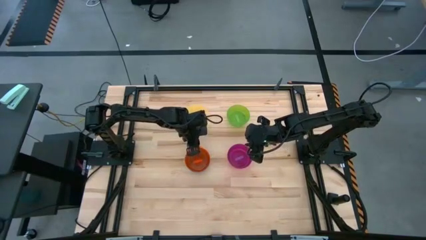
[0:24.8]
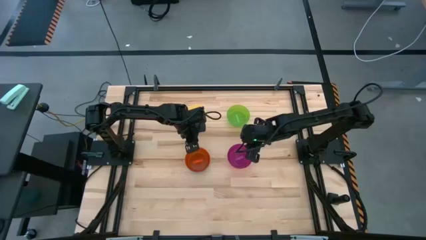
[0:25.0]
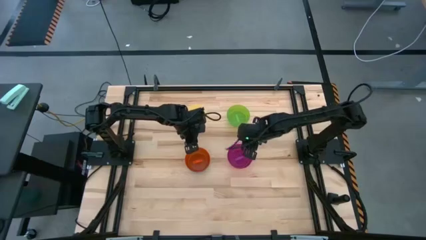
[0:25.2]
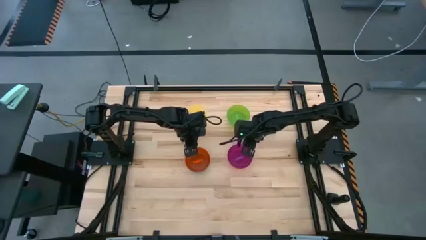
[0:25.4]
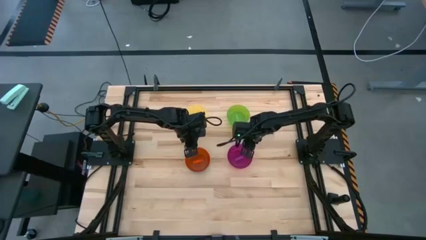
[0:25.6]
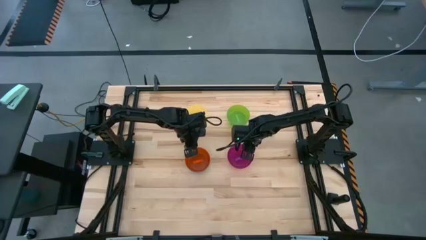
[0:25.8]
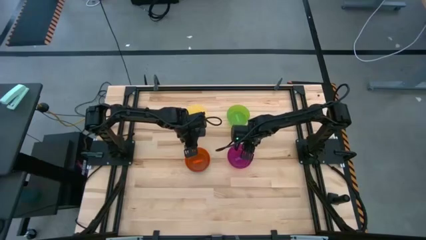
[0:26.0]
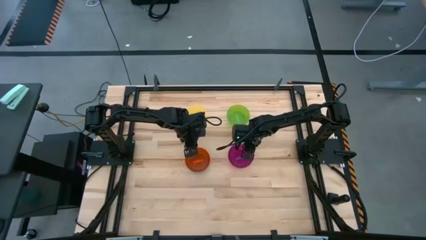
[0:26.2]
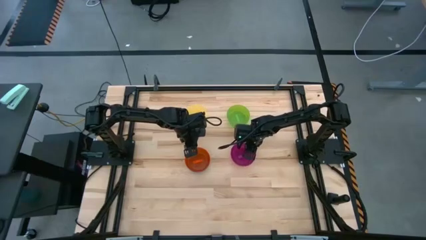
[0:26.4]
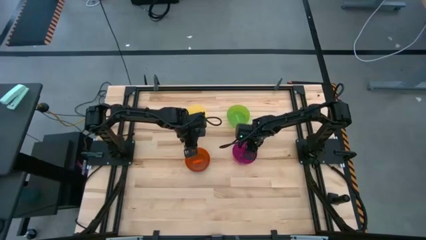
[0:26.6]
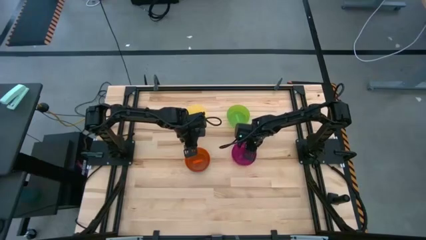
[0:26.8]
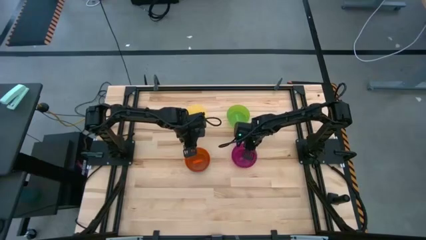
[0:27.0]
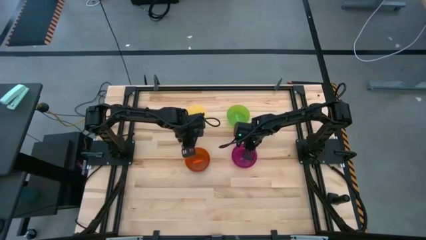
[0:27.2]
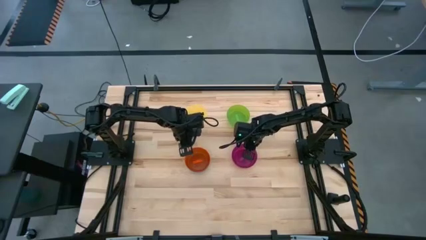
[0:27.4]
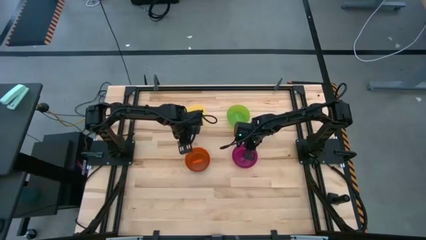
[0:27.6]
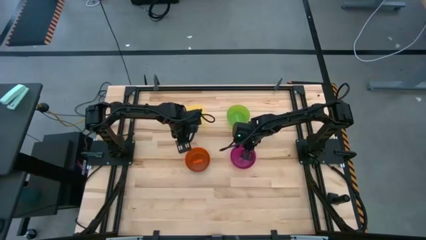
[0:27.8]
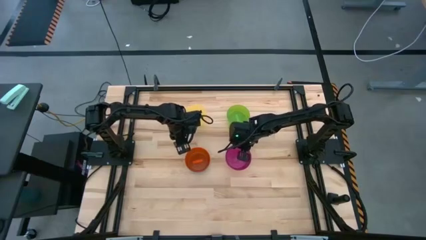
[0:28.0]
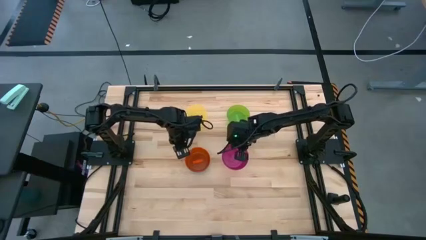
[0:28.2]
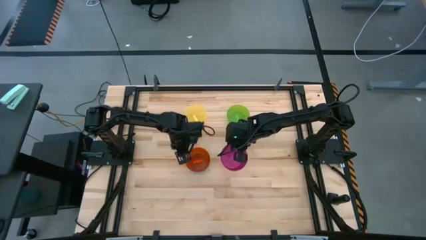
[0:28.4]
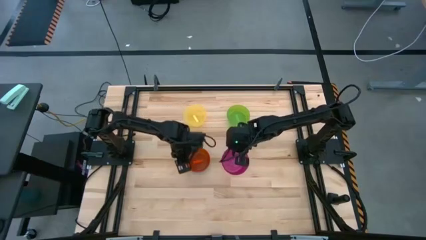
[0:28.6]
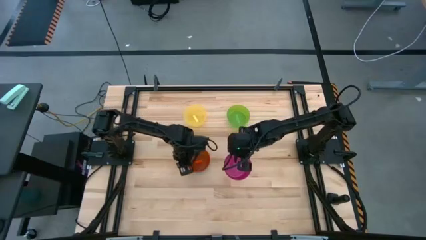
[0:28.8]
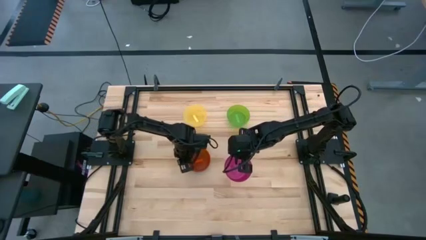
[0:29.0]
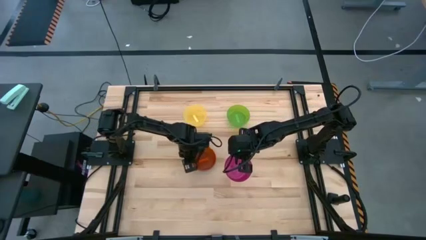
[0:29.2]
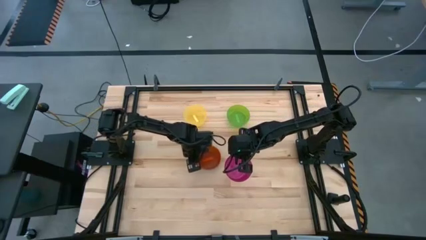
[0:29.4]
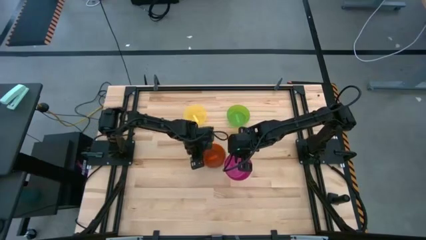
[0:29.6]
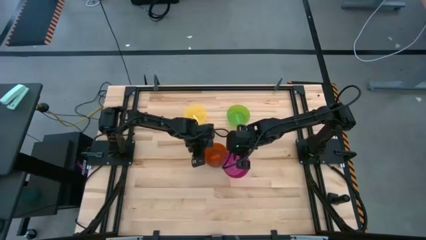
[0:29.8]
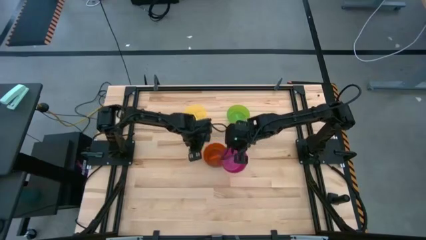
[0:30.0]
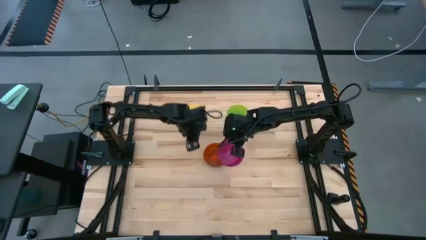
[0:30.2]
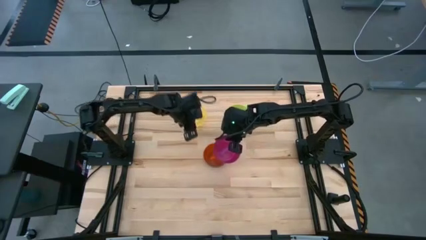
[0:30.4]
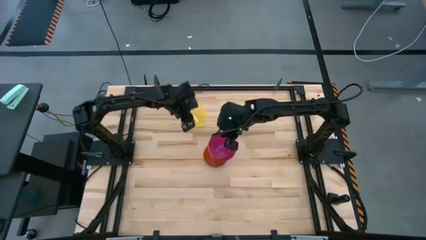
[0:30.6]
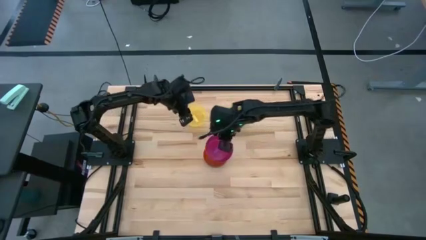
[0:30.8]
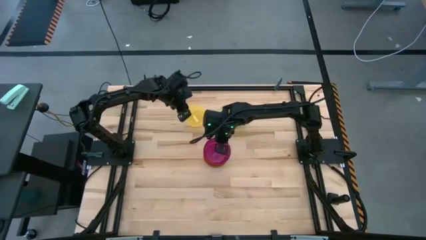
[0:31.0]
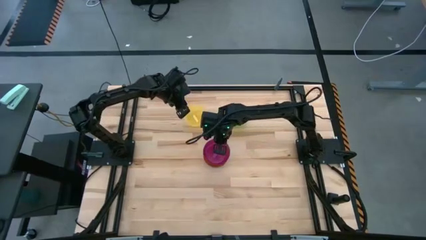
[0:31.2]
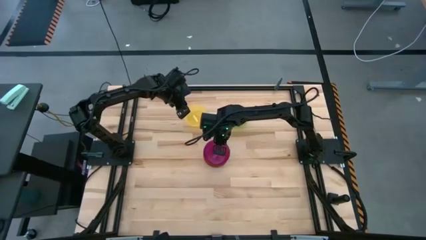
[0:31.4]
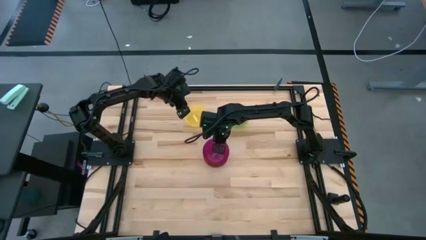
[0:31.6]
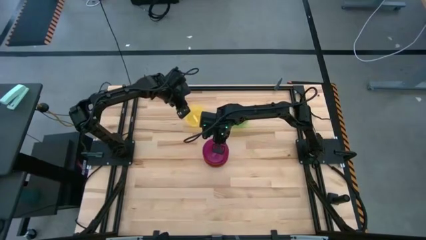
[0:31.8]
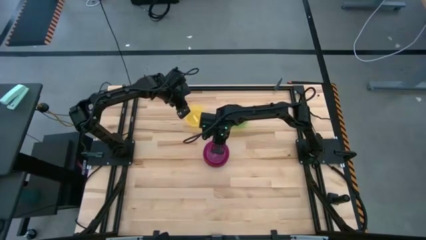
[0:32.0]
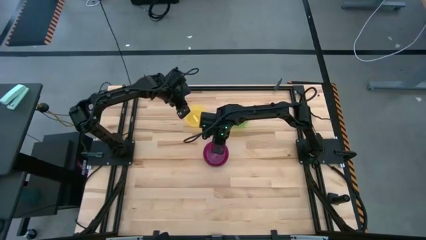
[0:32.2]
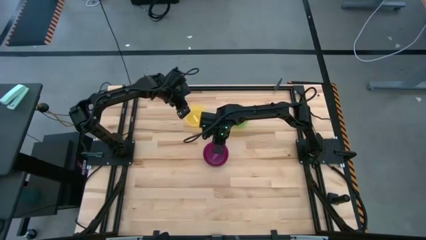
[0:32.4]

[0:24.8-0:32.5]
Task: Nest bowls inside each other
Stack the stacked bowls on top of the orange bowl

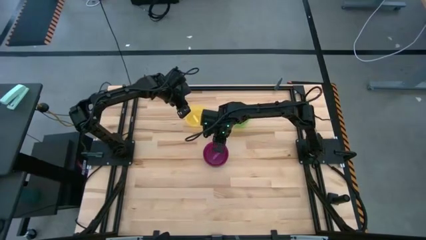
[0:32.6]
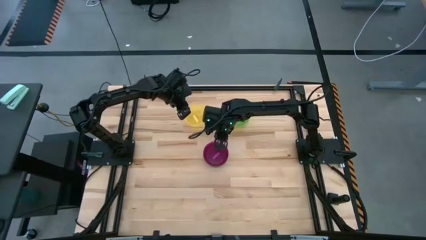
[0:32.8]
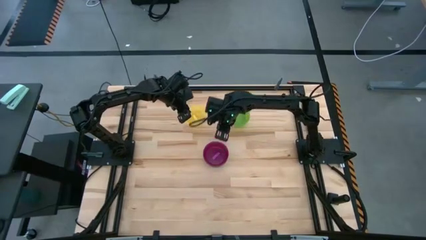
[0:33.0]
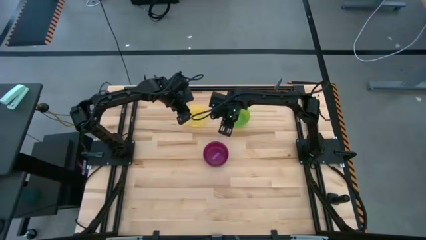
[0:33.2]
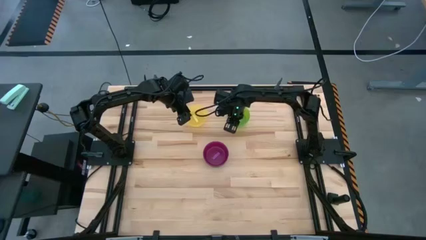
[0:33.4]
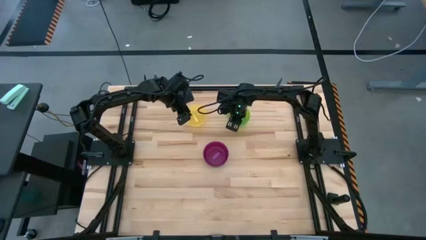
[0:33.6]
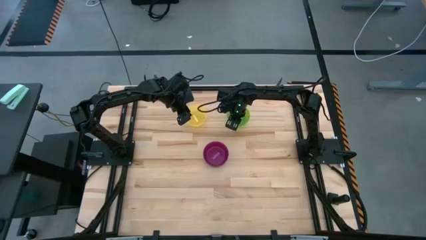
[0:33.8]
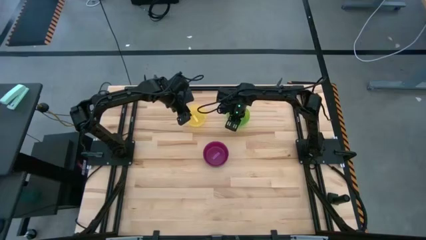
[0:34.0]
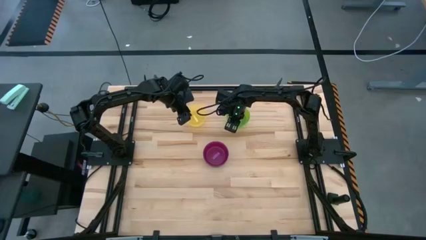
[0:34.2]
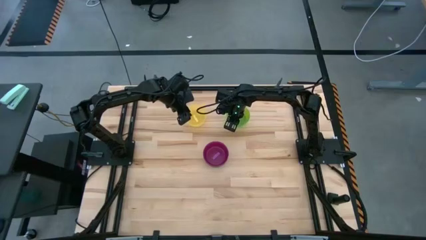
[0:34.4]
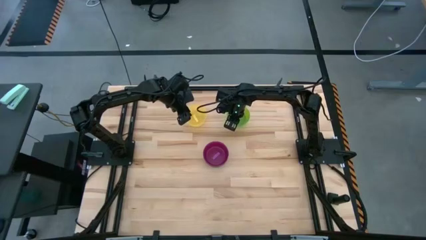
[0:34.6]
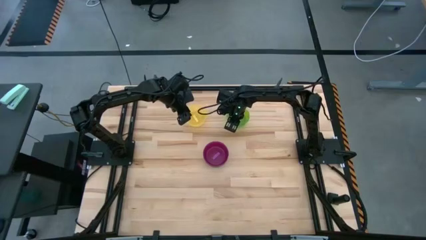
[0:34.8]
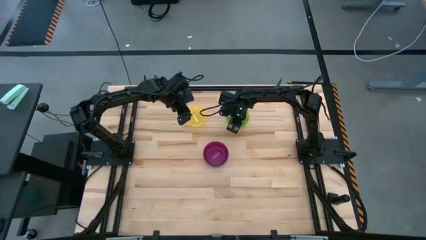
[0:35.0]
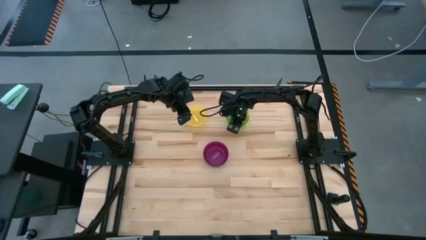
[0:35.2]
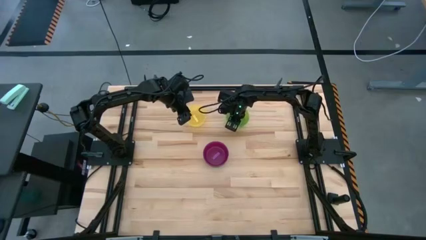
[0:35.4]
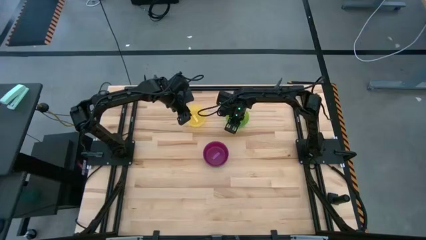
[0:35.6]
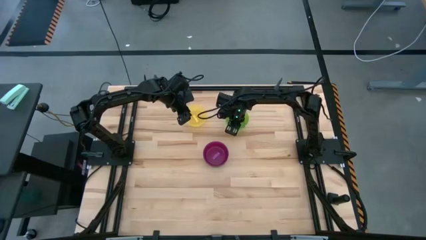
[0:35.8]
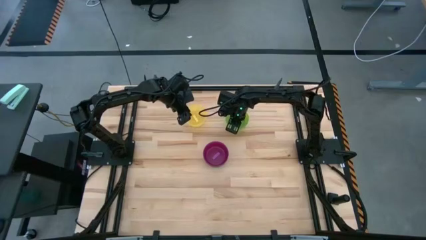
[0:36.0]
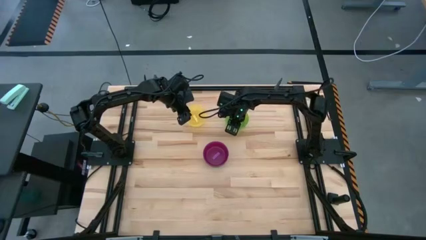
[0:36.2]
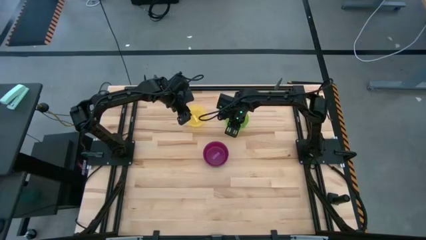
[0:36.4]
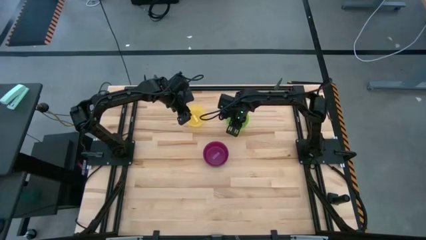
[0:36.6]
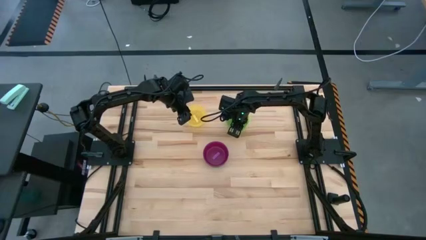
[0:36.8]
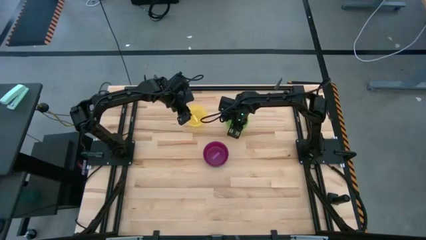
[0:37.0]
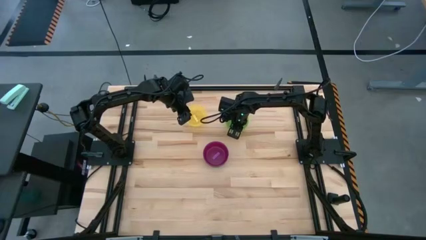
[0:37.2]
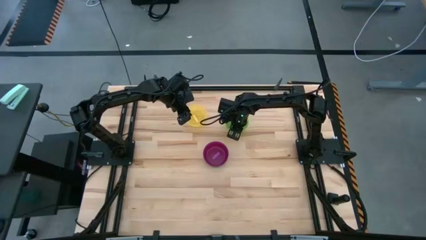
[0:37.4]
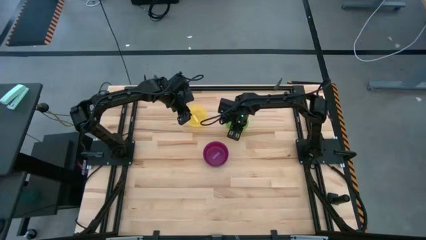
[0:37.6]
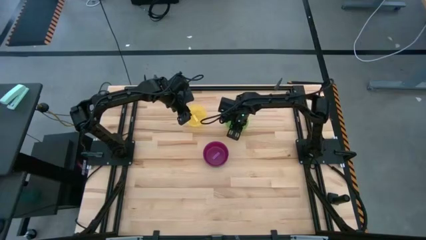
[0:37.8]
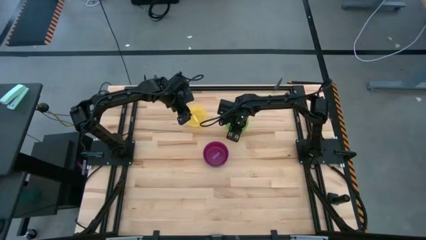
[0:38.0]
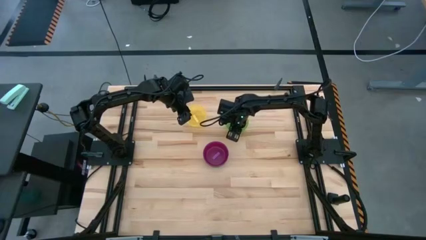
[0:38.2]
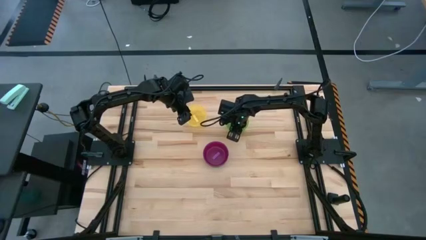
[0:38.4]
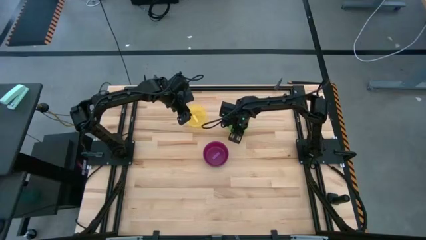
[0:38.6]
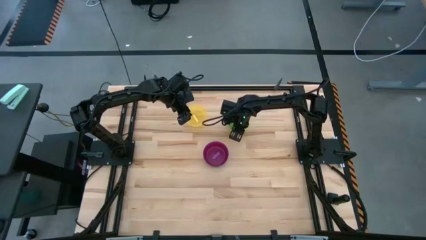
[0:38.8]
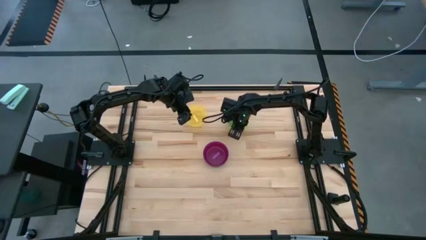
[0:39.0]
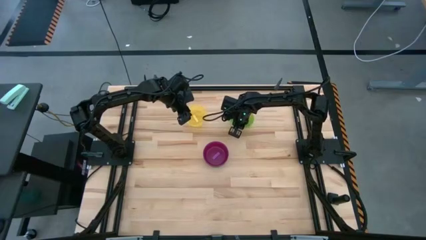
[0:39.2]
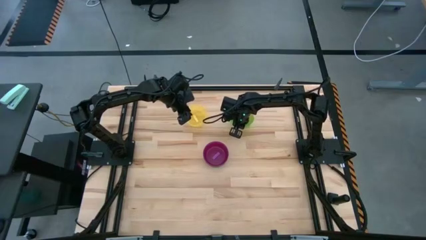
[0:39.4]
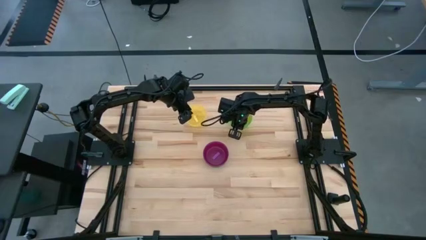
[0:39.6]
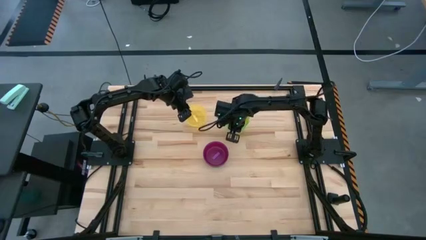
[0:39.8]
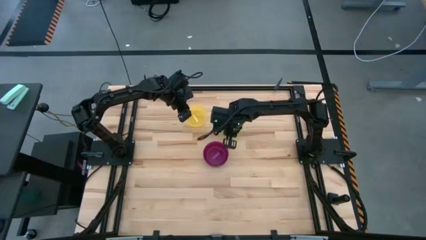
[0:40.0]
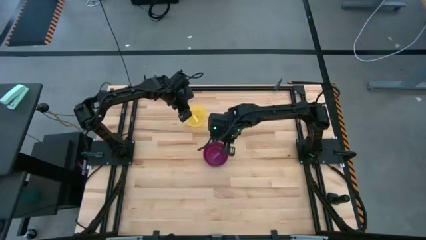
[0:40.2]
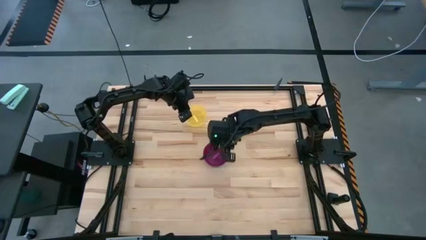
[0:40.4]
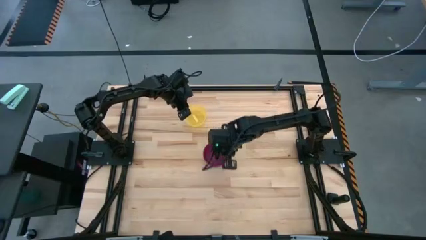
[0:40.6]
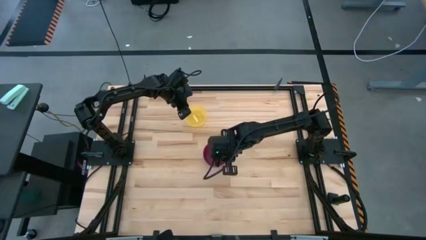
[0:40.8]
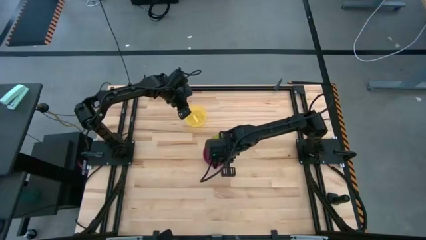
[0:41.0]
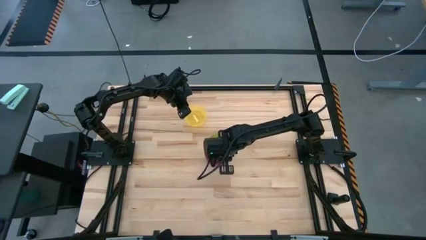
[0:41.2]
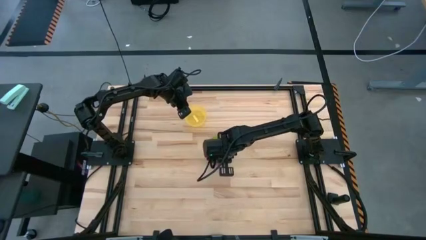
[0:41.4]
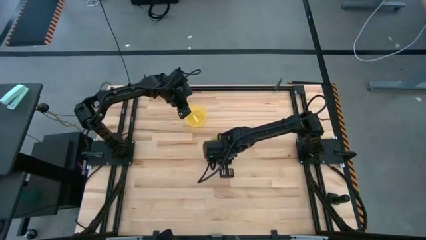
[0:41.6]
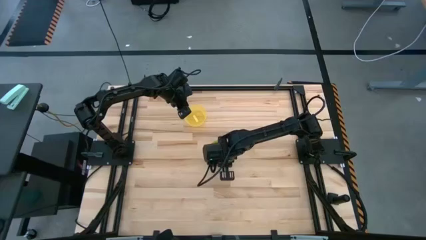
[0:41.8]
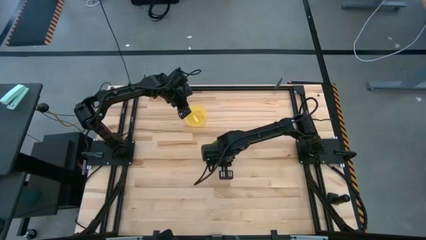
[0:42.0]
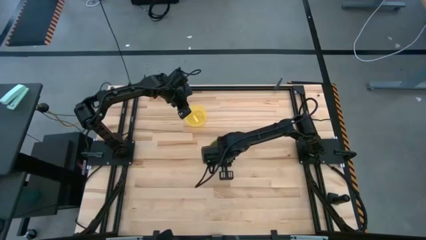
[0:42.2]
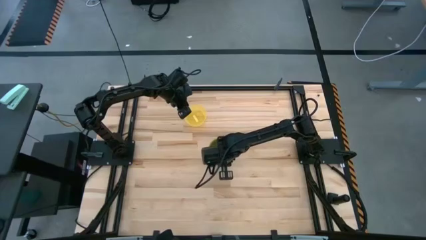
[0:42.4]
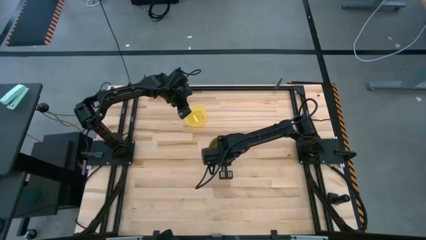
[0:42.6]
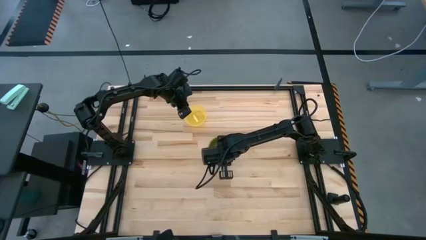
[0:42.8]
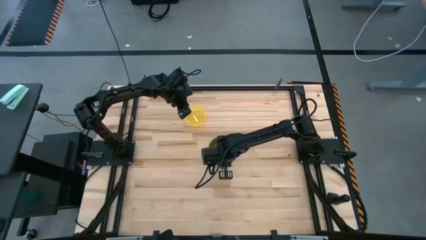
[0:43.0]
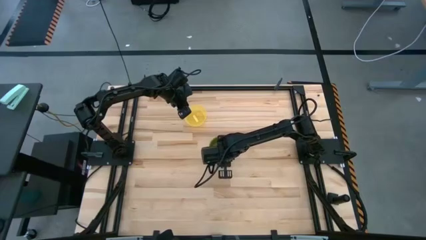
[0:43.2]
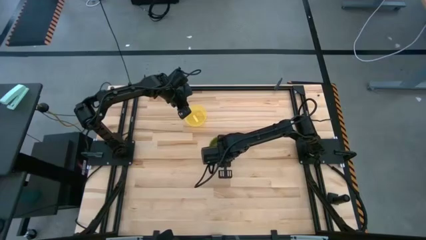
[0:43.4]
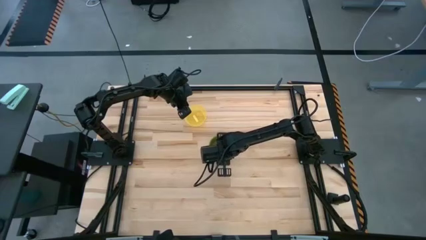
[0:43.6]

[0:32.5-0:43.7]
Stack the green bowl on top of the purple bowl
